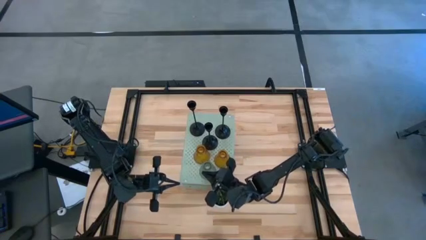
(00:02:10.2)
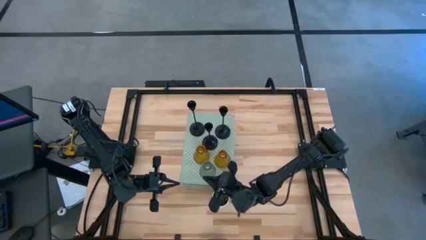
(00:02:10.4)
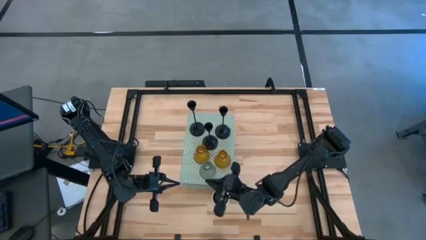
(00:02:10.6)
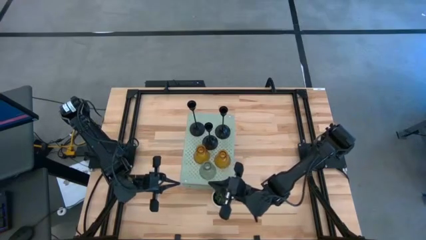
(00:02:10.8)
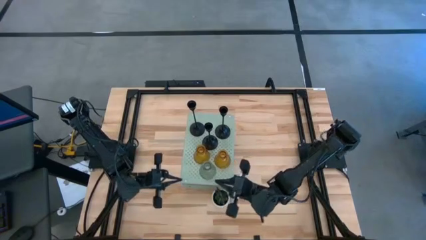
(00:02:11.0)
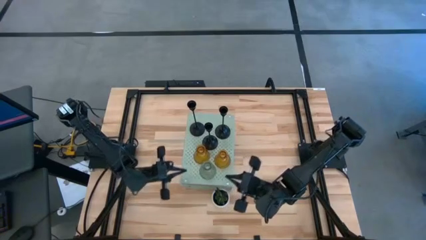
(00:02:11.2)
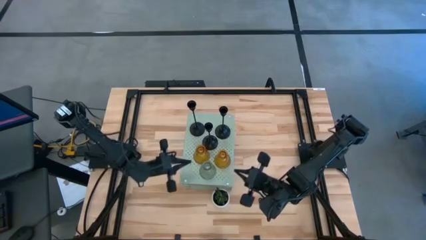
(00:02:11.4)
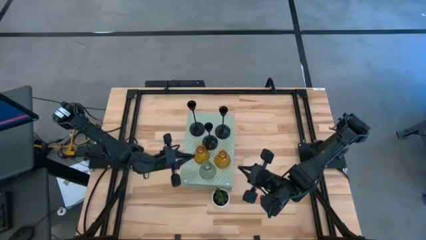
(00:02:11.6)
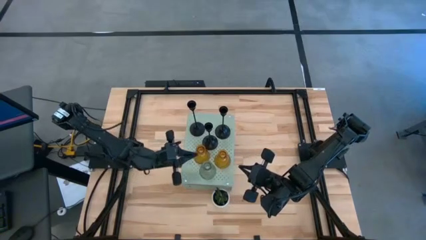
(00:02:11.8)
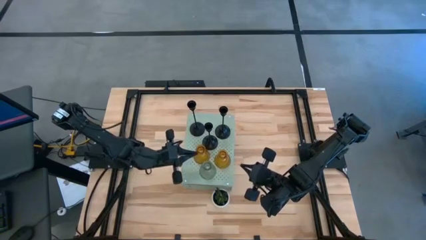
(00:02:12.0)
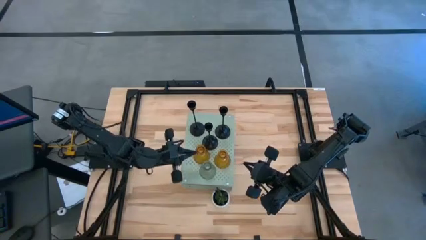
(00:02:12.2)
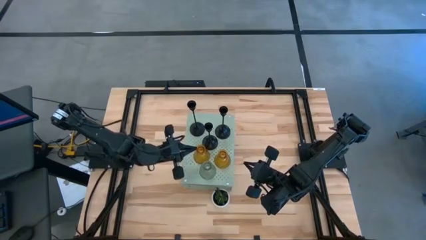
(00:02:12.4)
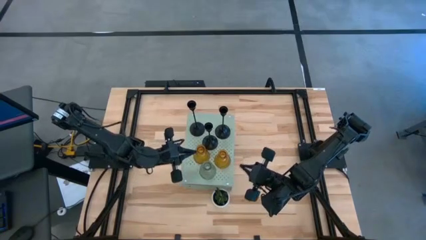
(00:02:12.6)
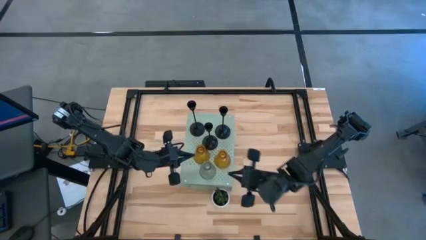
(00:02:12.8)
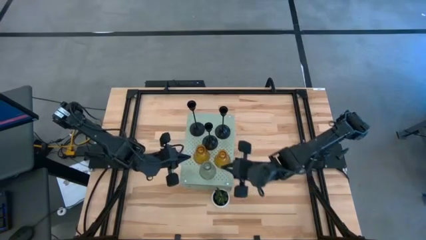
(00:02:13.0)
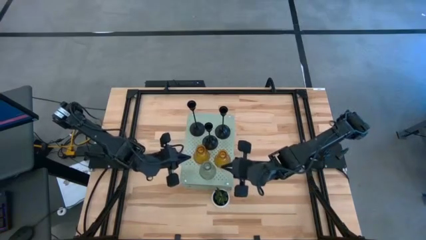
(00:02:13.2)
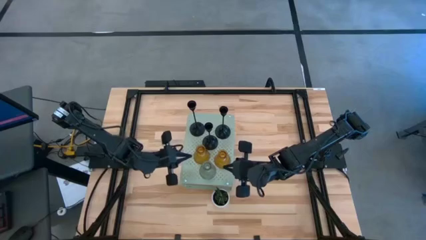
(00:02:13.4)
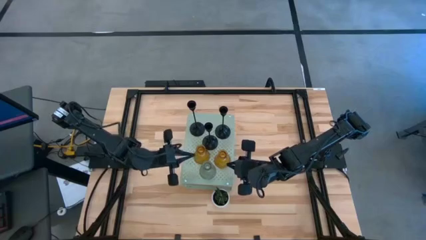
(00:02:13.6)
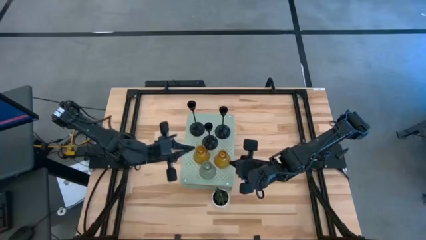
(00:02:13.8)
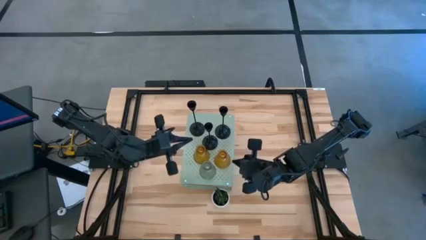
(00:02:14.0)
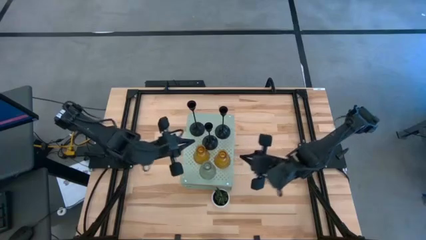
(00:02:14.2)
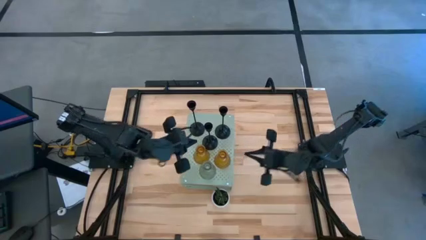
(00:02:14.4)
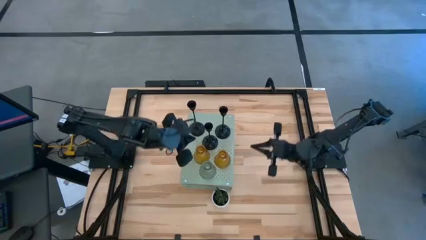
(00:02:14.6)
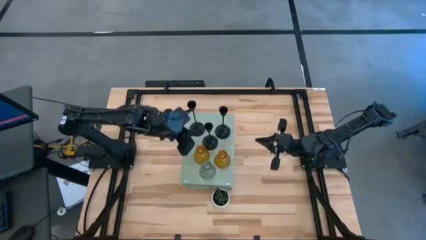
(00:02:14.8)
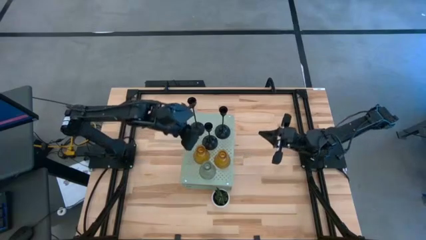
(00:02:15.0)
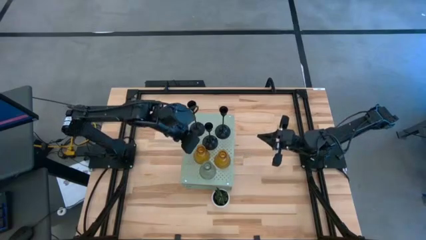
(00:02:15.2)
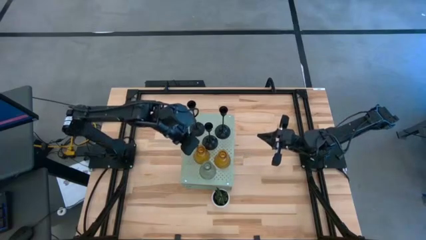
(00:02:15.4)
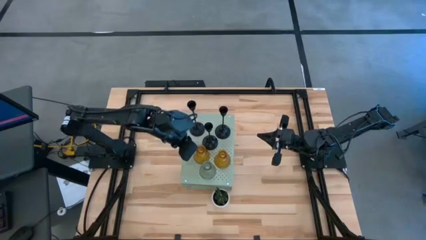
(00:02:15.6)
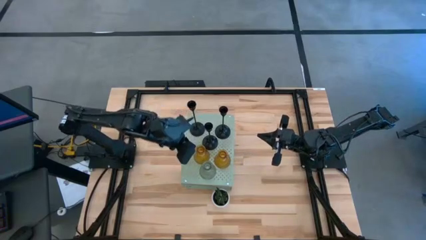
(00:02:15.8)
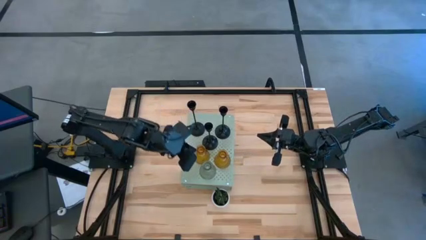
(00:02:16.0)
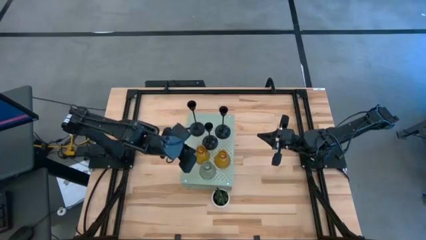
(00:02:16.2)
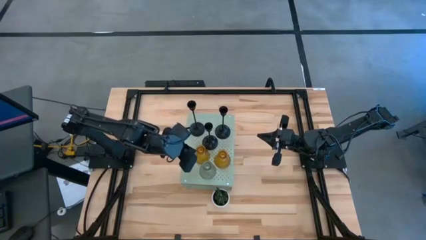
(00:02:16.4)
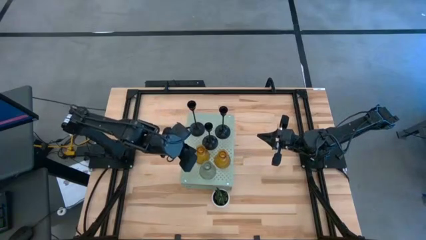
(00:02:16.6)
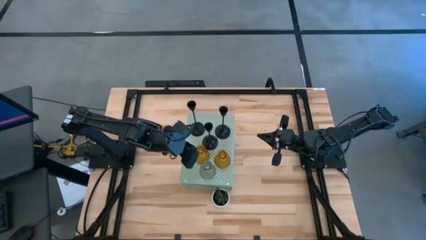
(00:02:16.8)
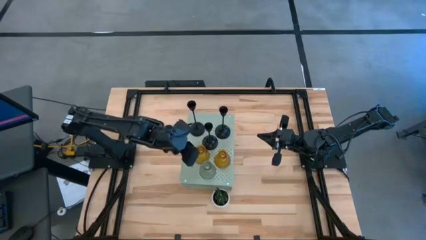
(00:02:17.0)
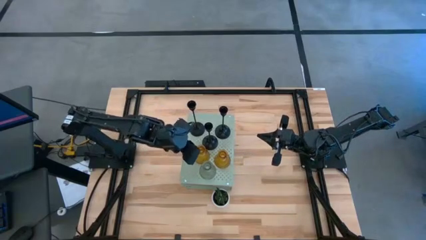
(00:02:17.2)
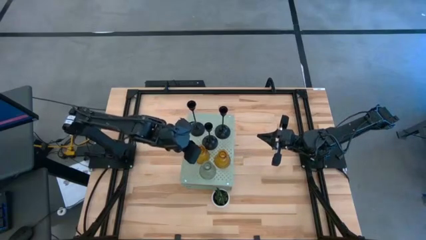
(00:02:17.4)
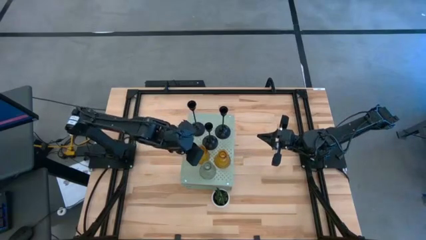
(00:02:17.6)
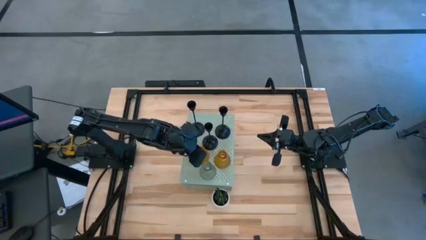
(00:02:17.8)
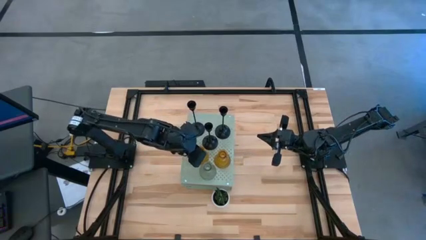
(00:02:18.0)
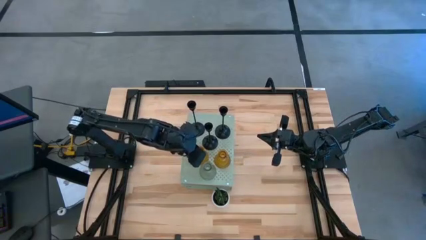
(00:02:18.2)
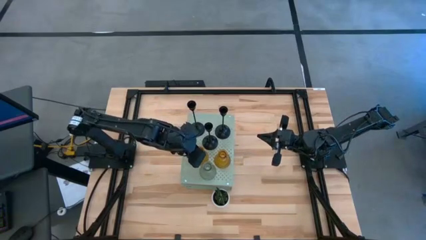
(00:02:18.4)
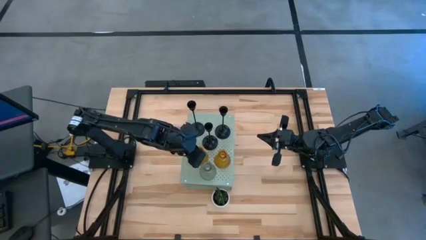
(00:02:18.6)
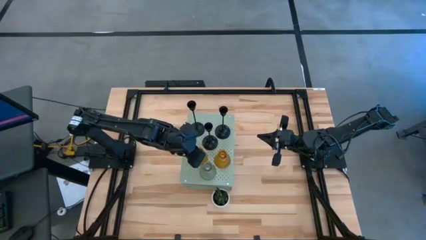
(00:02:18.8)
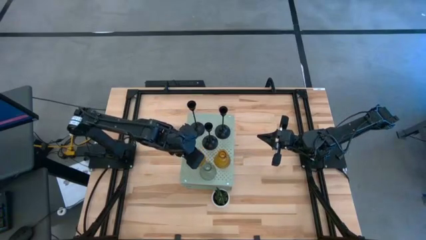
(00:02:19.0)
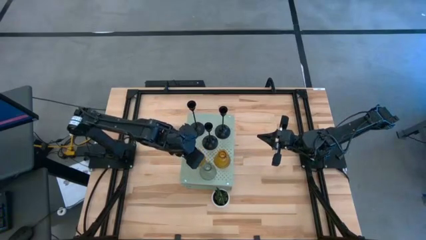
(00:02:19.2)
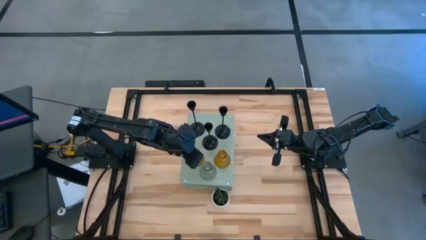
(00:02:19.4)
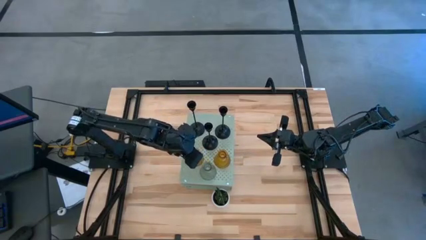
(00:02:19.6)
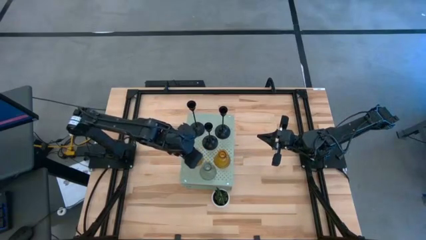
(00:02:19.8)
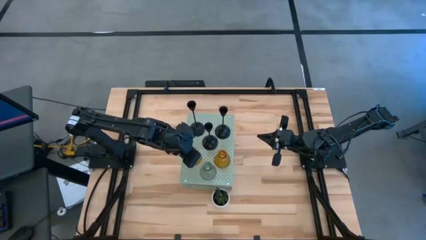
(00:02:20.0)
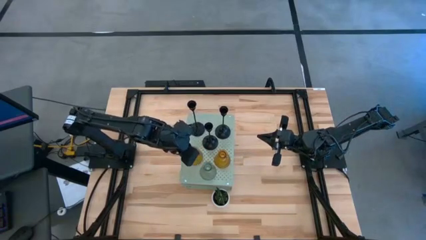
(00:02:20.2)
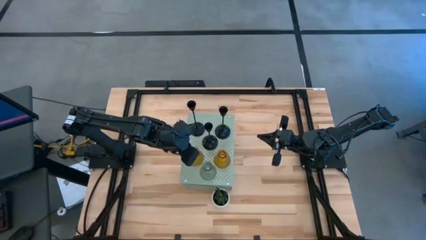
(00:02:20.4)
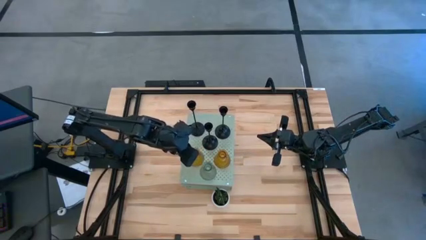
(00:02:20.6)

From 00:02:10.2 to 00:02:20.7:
Task: Pick & Place candle stick holders
Adjust the left yellow candle holder

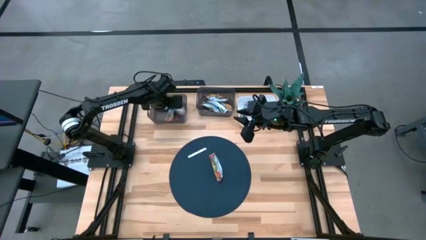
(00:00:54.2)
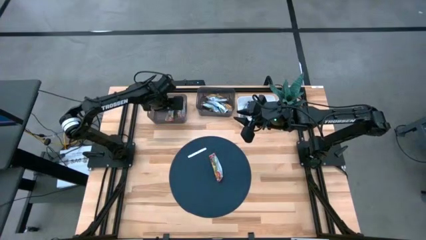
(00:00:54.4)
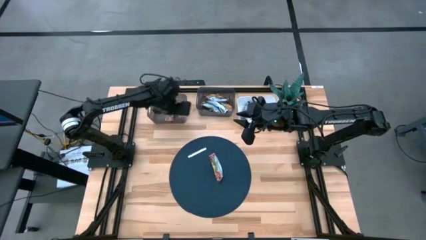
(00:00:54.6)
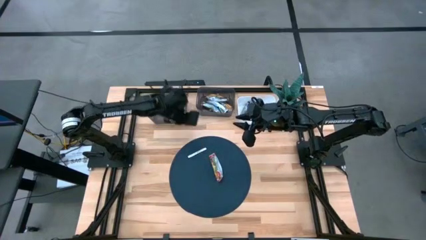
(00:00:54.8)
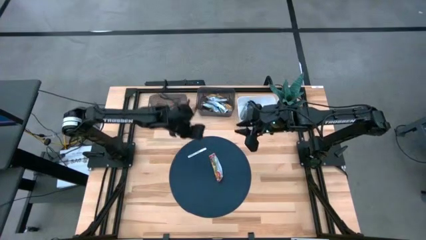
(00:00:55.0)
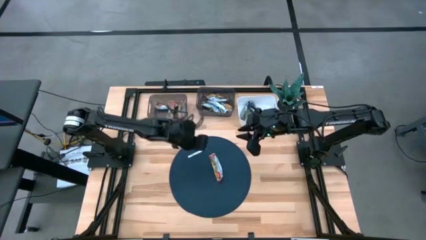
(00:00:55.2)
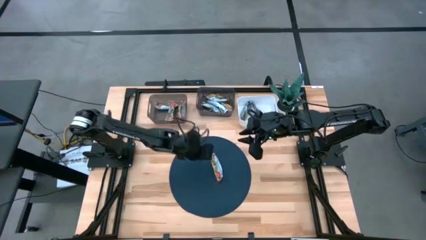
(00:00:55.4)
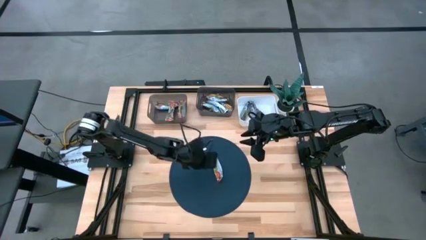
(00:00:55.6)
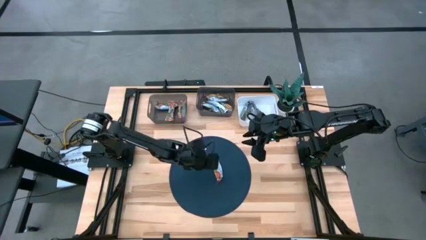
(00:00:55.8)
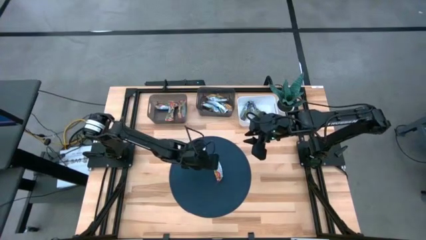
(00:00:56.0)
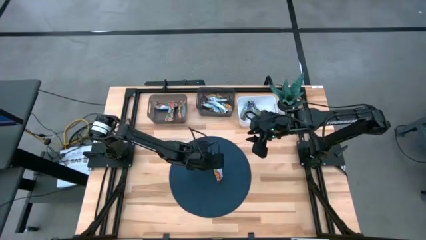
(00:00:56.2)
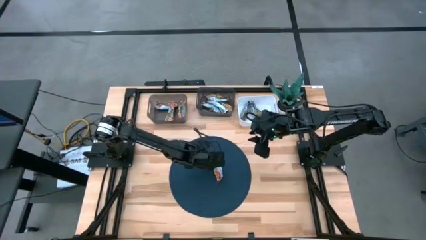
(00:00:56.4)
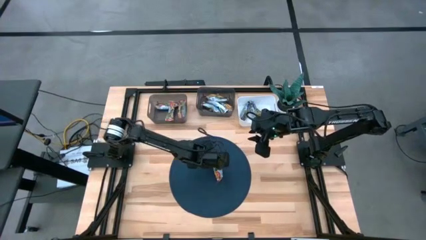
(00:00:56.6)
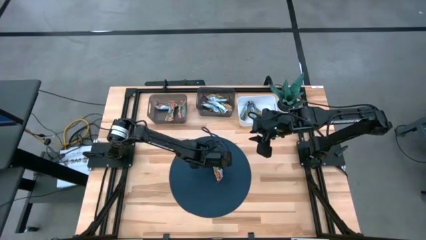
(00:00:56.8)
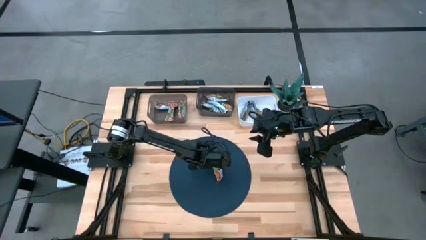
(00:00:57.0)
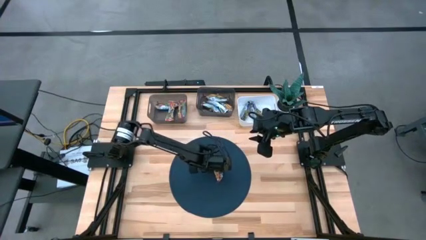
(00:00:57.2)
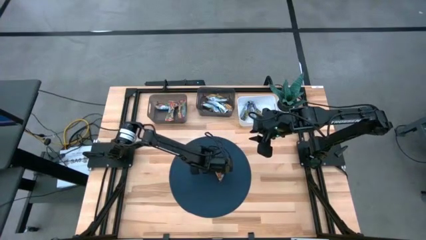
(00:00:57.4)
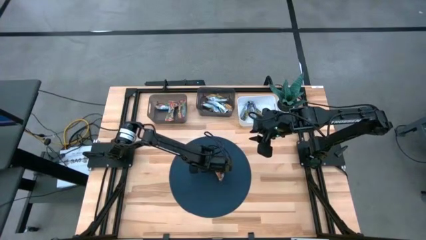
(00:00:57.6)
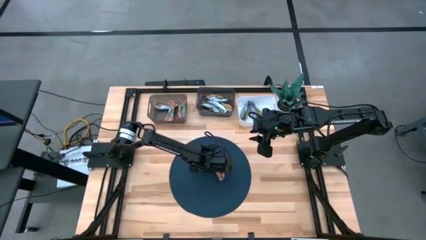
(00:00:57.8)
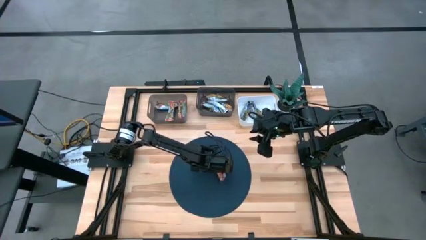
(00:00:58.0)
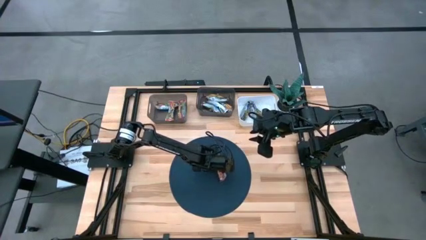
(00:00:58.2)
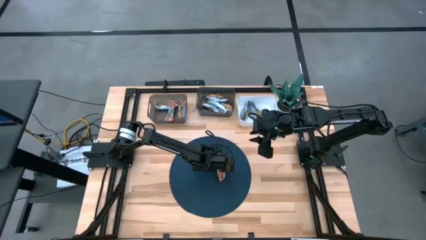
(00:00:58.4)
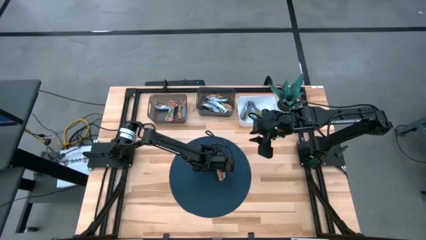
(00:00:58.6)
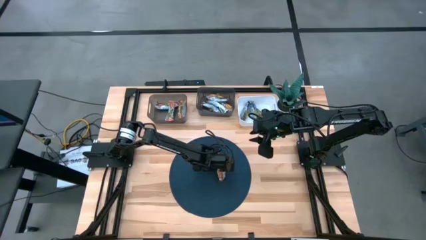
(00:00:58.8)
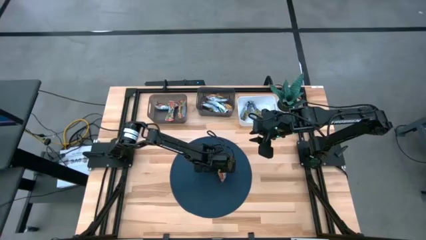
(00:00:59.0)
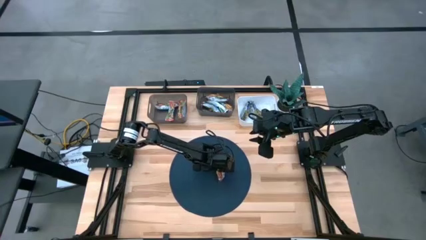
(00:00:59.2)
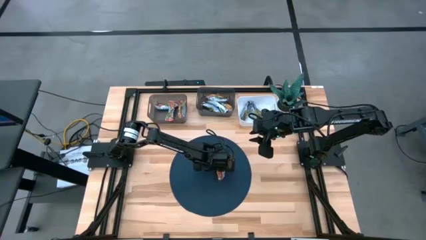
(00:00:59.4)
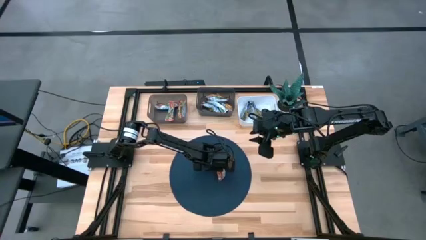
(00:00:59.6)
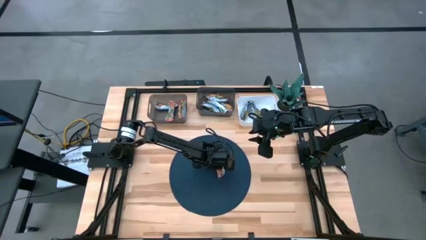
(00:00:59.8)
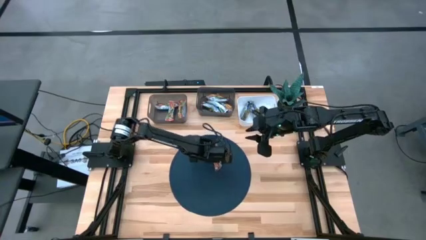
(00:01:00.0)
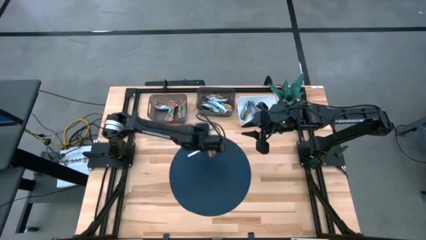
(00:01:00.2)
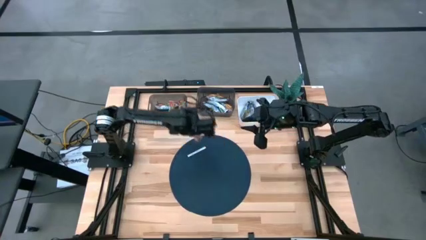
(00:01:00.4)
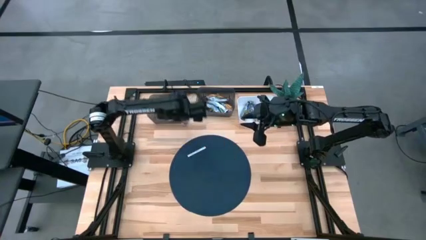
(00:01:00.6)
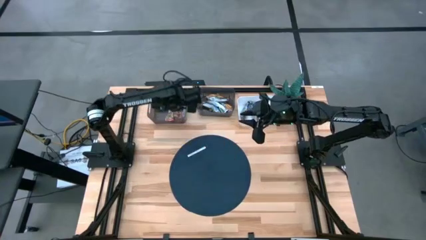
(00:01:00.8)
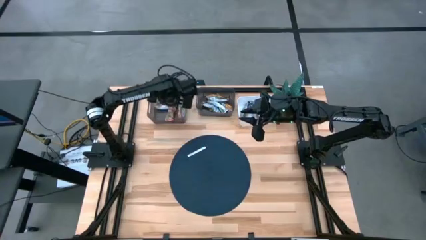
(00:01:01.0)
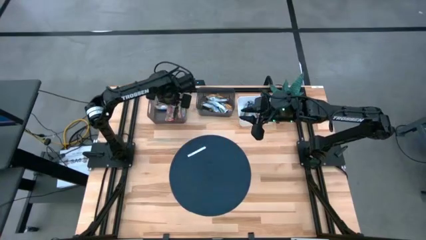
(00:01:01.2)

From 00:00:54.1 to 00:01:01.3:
Task: Pick and place Granola Bars by type
Put the red granola bar into the left black bin
